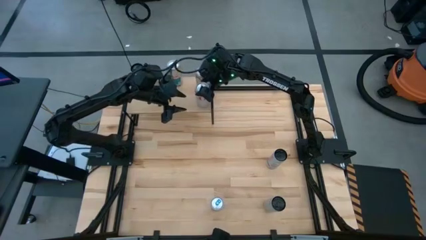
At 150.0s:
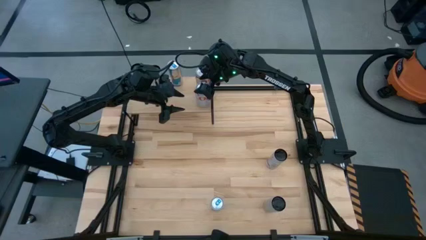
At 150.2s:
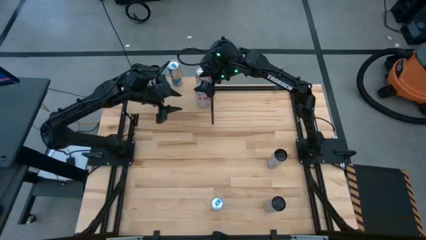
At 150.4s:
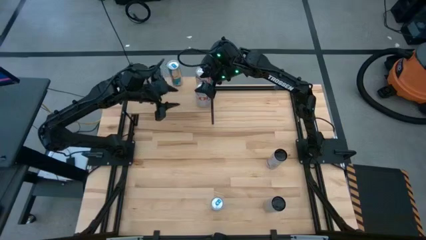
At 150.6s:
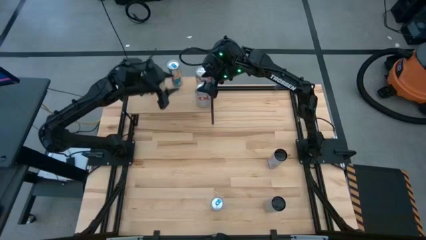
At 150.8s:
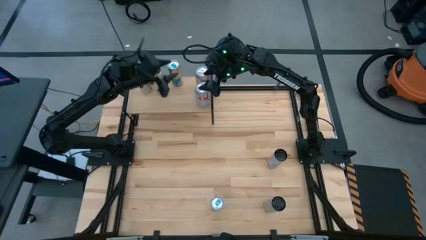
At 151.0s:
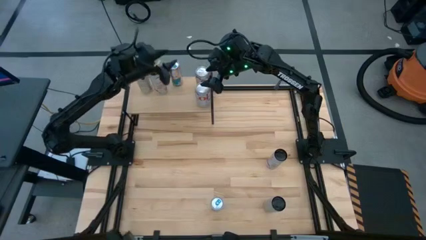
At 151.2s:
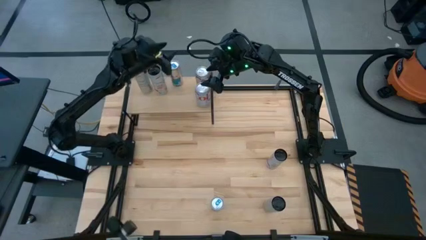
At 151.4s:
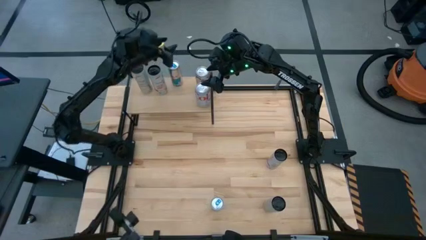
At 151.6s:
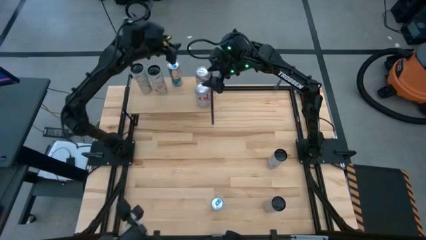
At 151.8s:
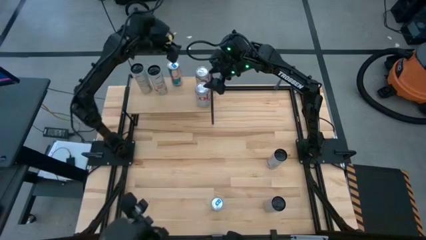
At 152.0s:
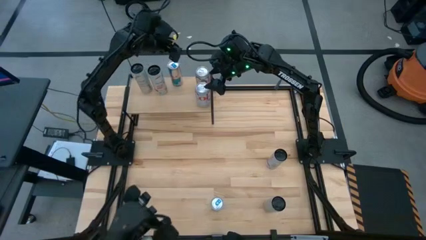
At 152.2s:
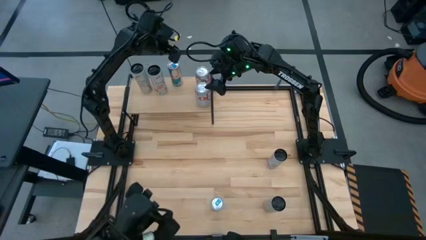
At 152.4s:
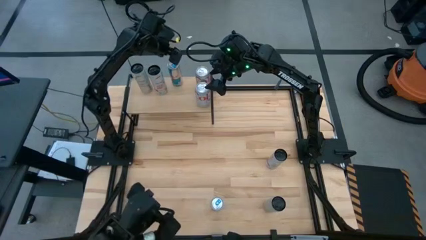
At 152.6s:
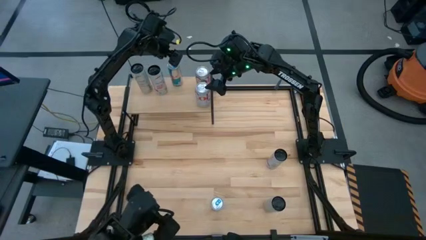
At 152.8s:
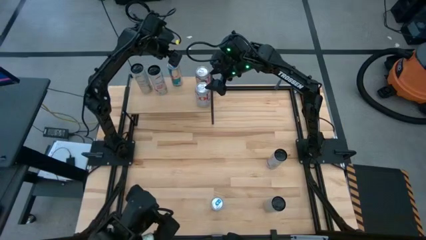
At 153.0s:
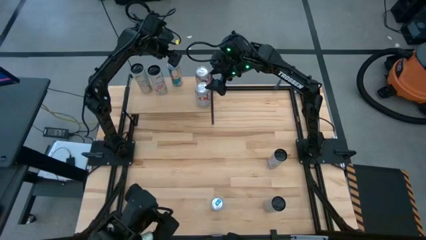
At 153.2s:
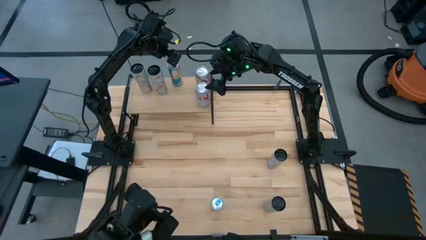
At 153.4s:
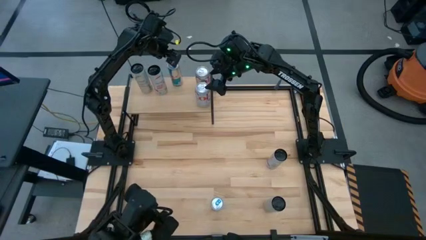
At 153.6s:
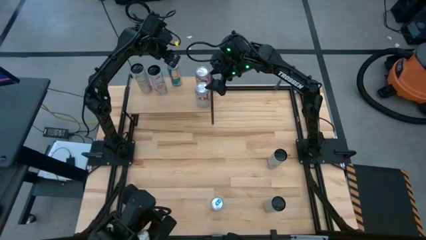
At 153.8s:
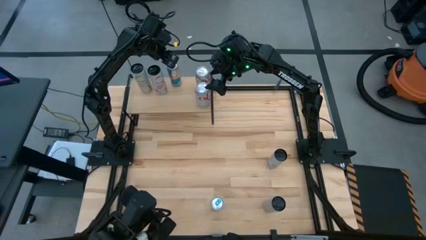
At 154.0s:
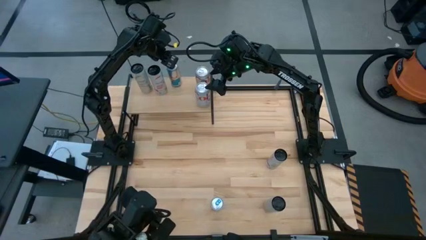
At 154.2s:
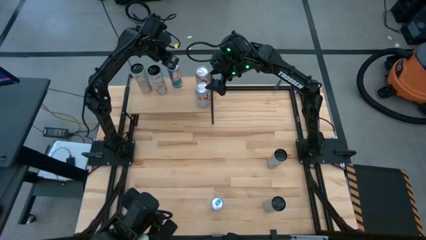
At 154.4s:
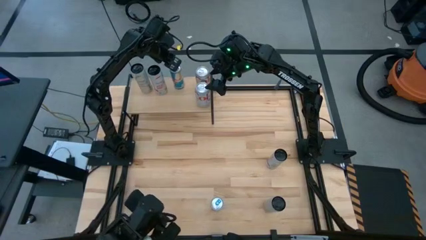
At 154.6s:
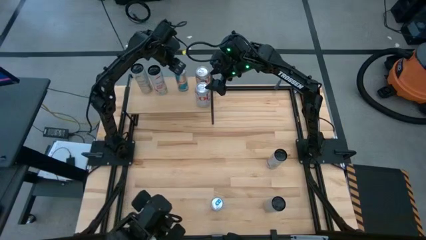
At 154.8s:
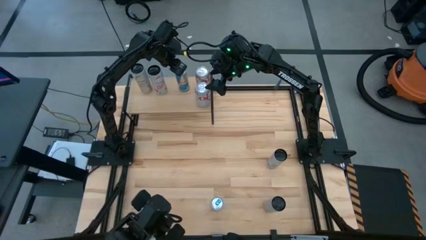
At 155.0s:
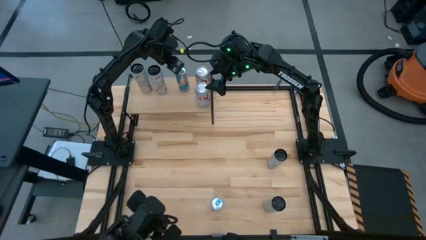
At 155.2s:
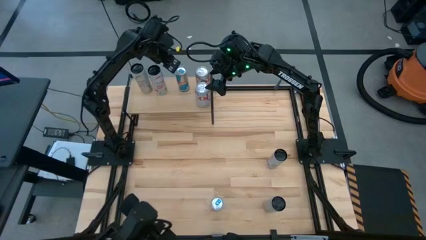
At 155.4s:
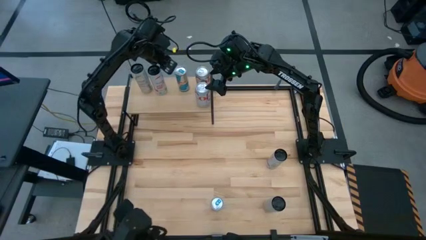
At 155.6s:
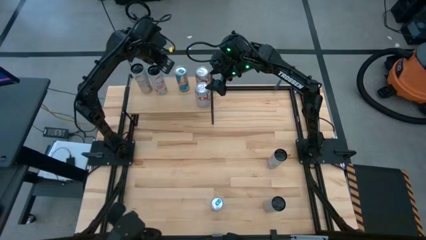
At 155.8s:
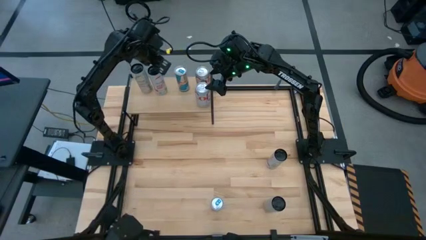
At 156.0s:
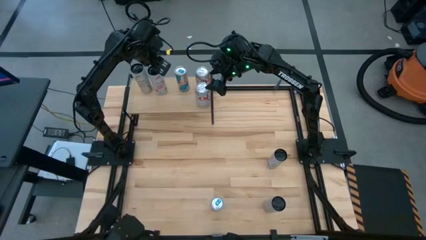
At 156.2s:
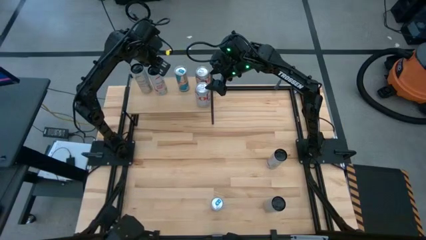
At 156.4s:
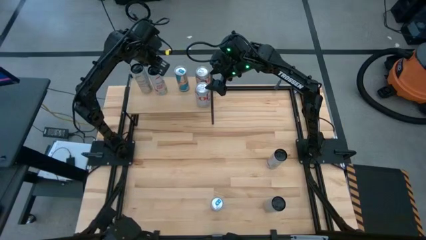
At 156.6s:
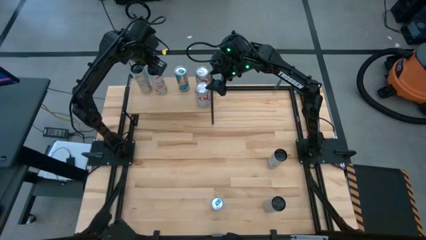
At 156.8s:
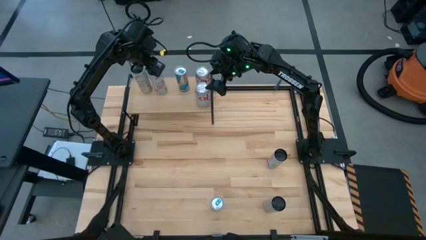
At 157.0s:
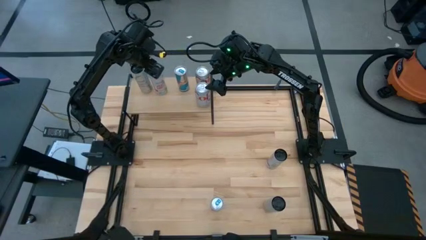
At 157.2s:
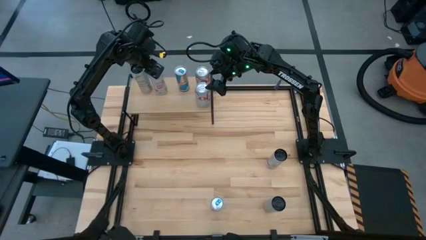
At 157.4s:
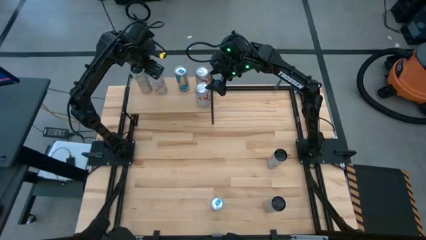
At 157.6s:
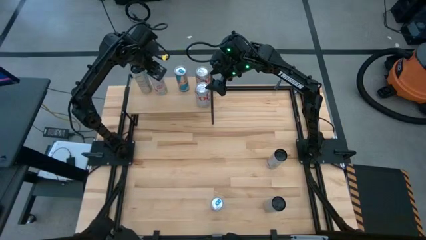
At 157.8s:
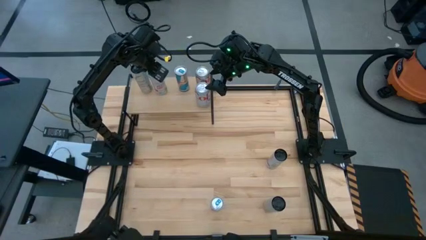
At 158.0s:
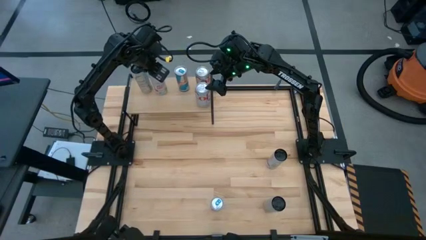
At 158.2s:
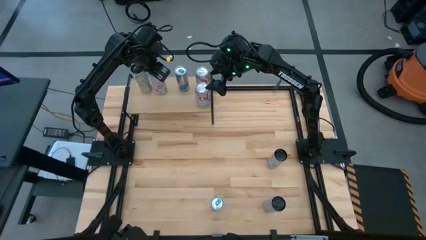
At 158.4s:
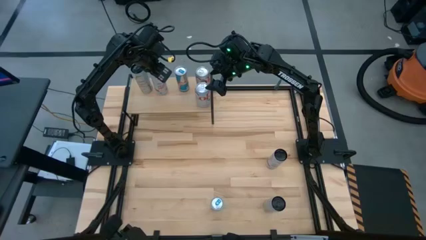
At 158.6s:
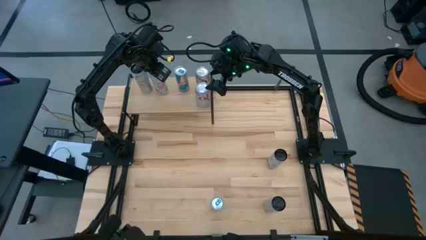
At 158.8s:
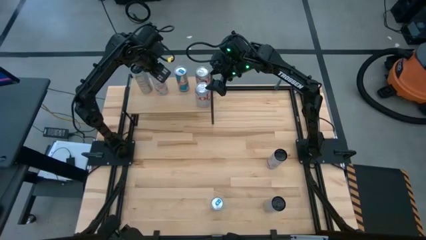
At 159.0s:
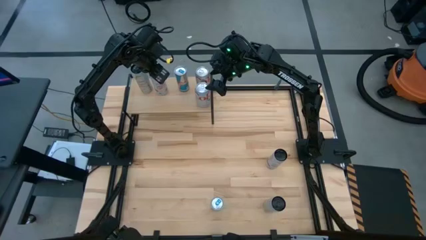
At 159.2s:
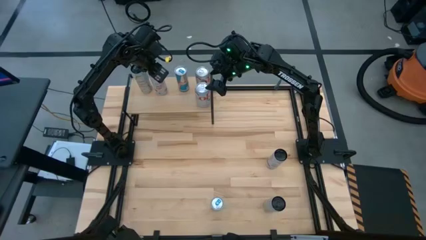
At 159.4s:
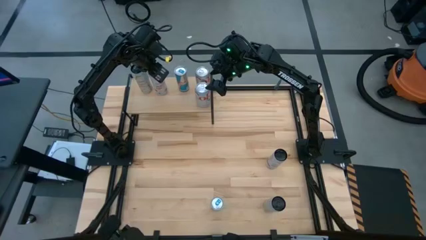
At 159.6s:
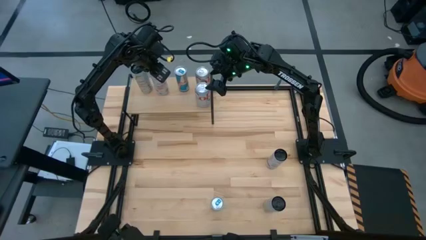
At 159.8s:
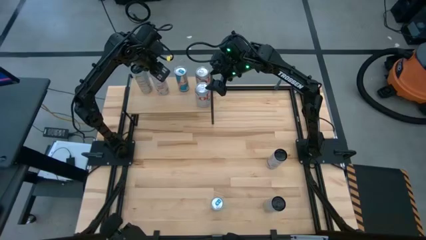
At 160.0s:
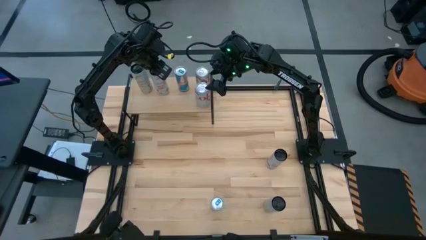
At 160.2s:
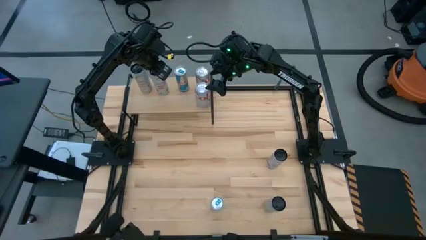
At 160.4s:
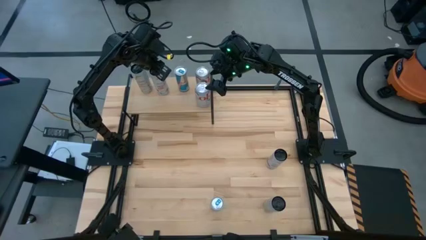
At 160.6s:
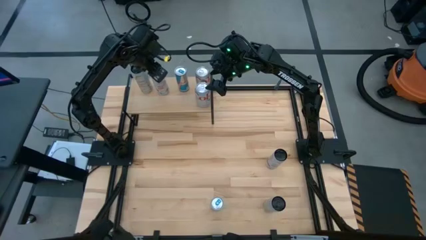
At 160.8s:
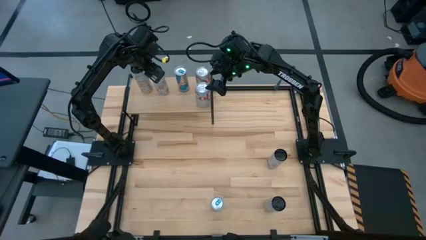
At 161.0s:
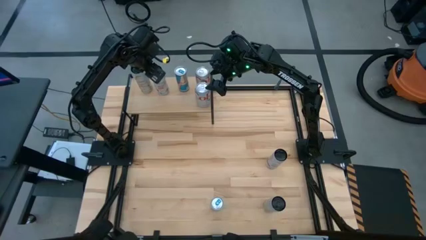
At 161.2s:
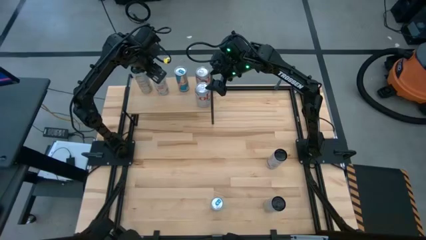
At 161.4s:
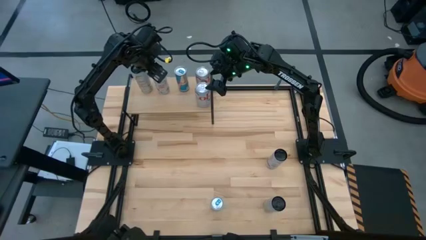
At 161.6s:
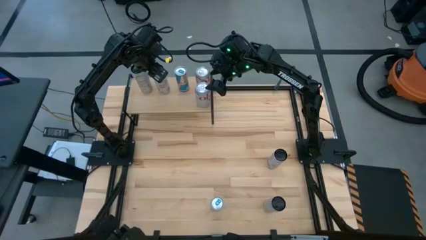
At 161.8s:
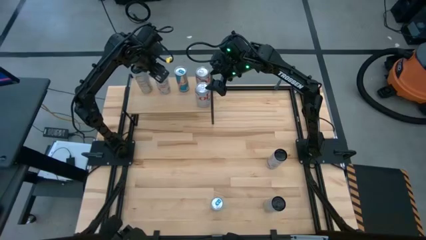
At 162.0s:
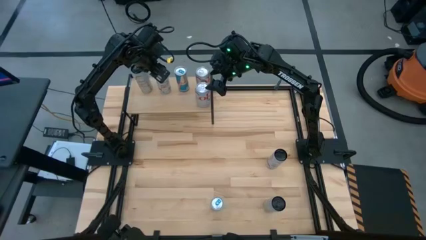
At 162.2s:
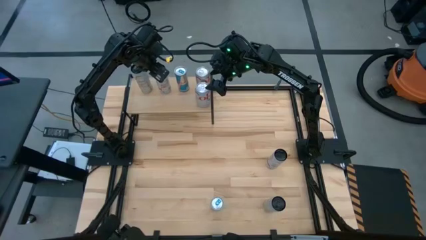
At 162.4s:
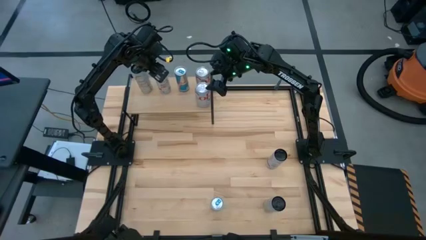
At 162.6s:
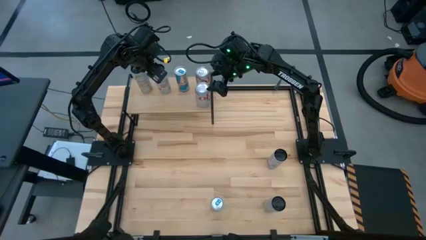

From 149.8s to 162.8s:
Task: Place canned beverage on shelf
Adjust the soda cans on the shelf
